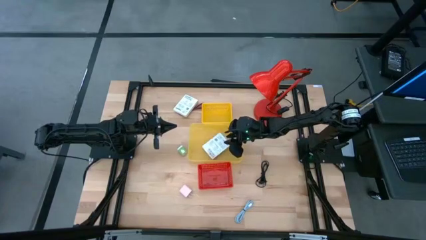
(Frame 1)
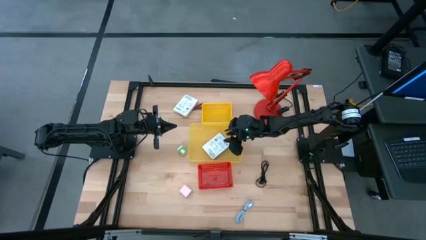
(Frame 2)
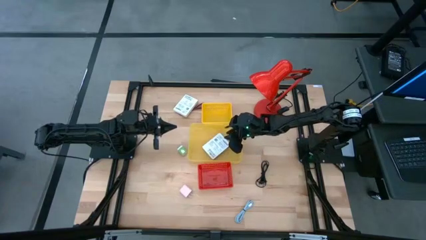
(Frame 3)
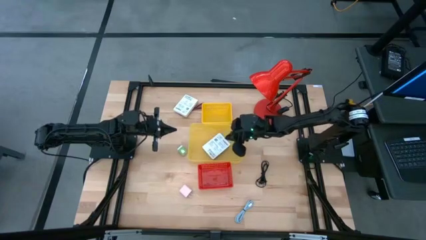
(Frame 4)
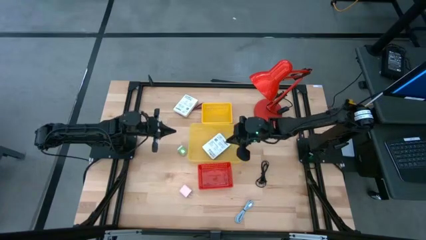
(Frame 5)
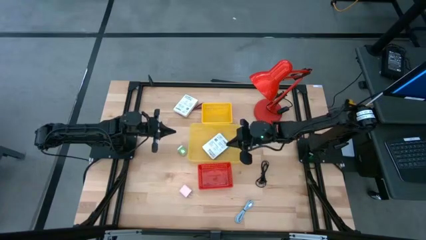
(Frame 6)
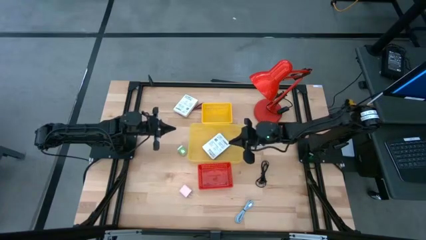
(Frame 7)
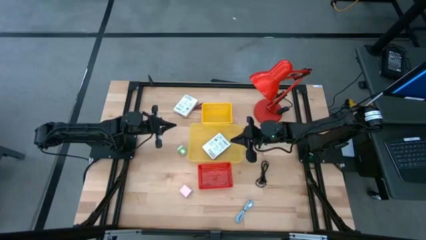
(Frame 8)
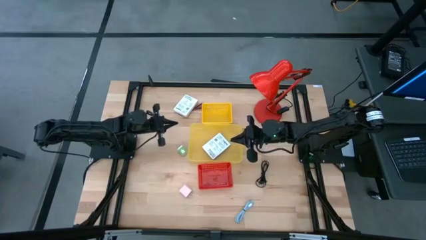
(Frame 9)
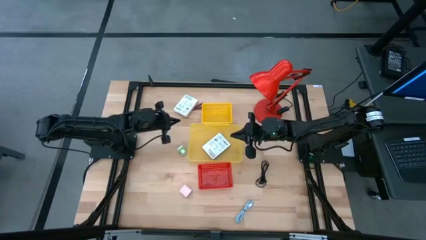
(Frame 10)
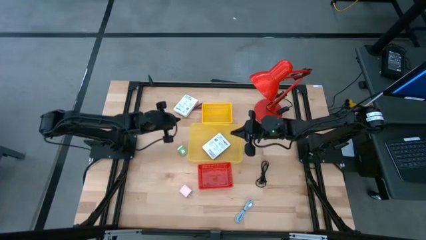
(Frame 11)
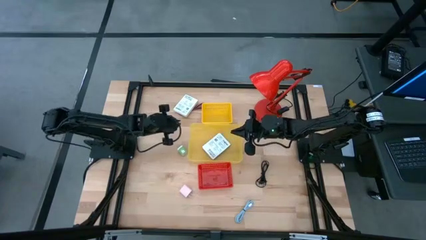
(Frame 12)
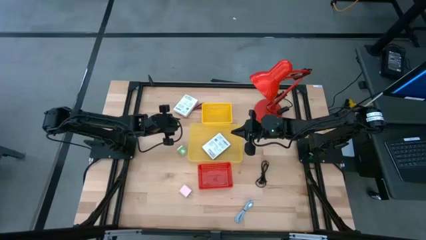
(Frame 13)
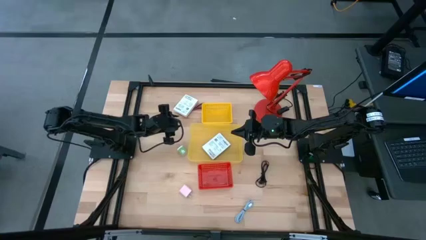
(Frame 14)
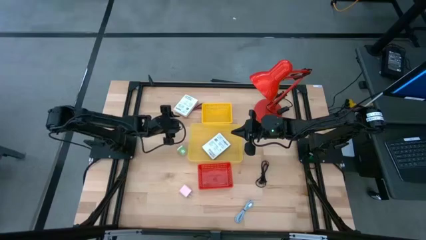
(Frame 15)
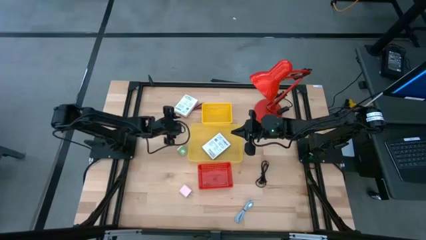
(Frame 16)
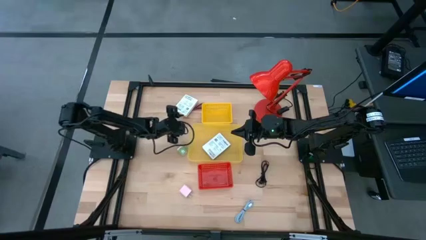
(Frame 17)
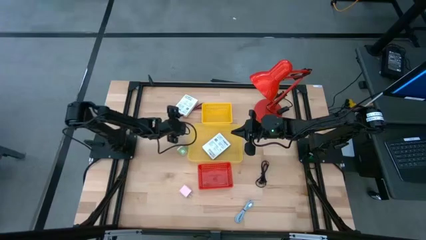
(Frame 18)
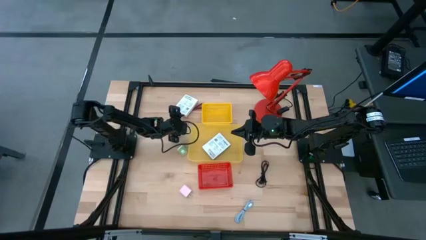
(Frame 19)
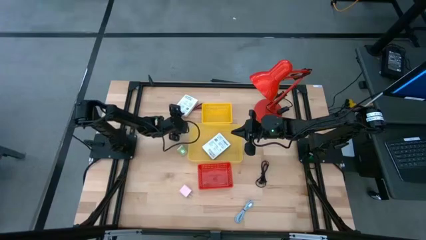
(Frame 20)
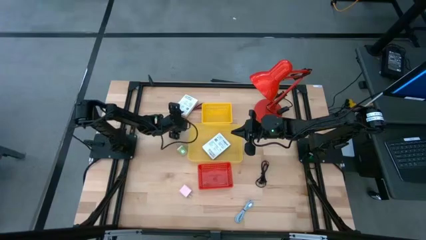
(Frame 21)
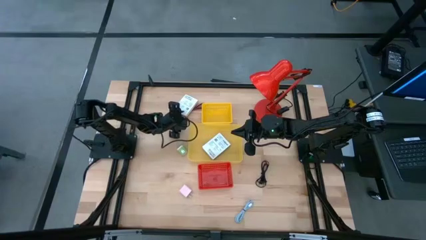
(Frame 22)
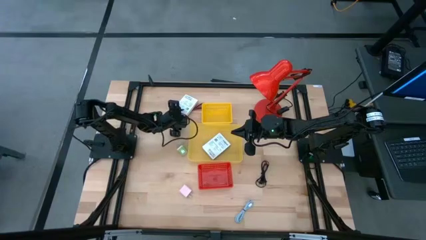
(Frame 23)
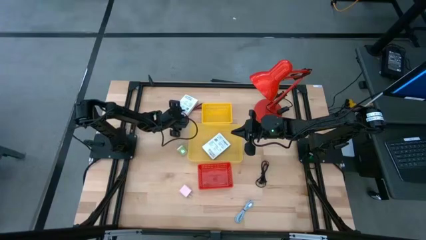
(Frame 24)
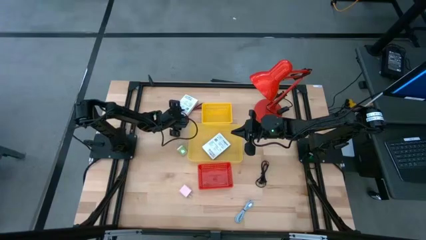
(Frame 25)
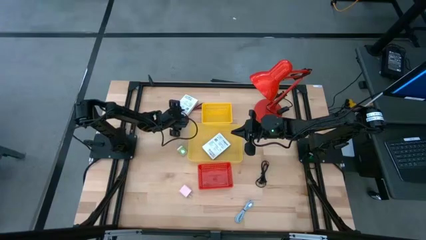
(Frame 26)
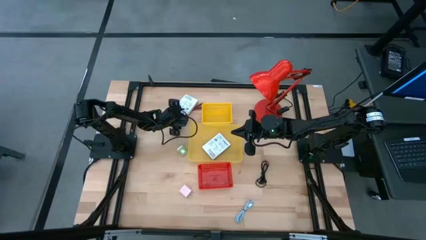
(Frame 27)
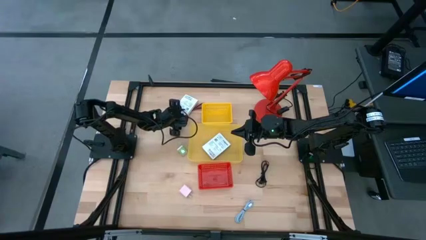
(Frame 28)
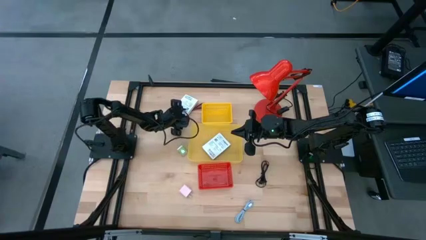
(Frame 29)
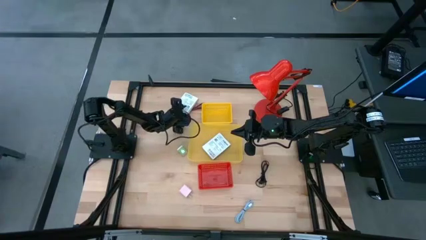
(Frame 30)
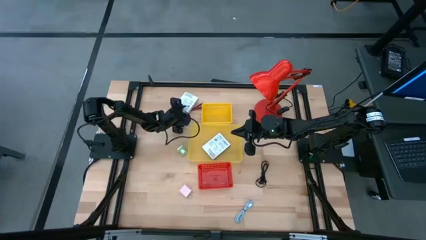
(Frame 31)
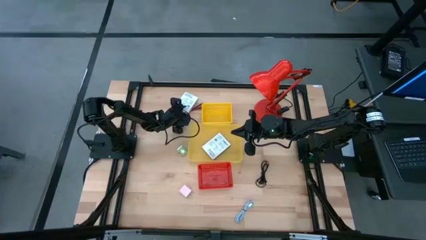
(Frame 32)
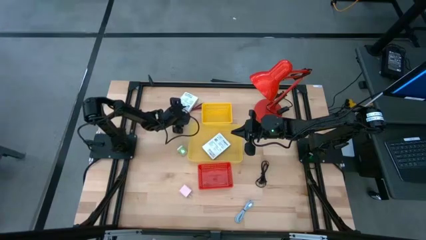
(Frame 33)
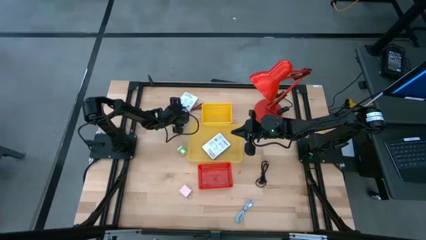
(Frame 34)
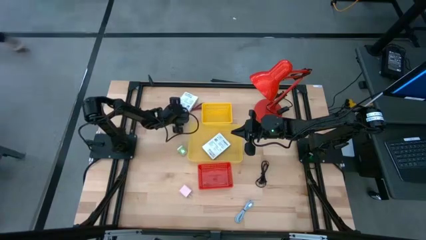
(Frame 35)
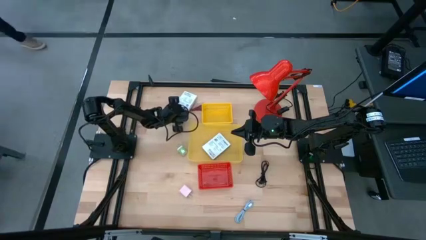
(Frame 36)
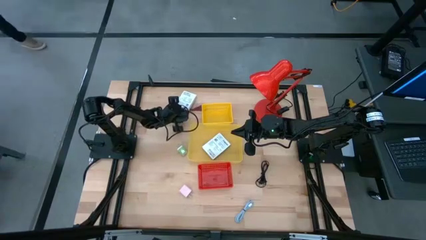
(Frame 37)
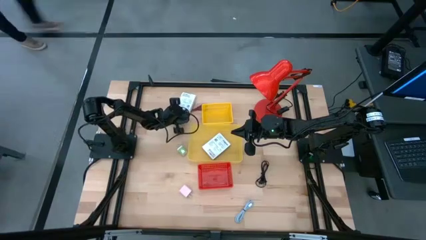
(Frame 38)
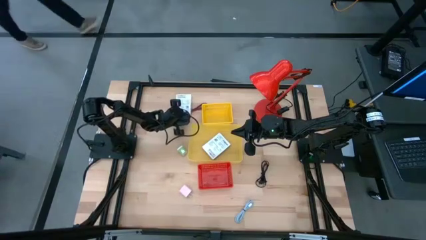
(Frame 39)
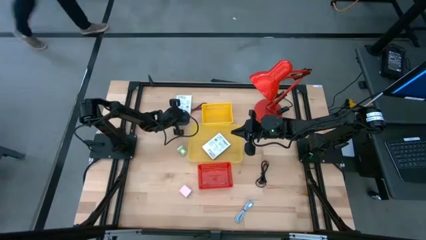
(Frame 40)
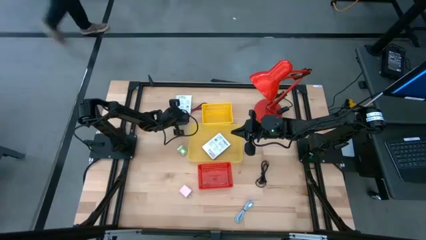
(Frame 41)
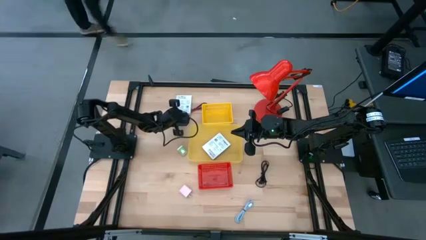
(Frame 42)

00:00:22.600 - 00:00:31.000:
Task: Pick and place items into bin
Put the white card reader box into the yellow transparent bin

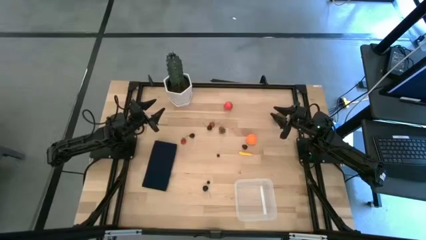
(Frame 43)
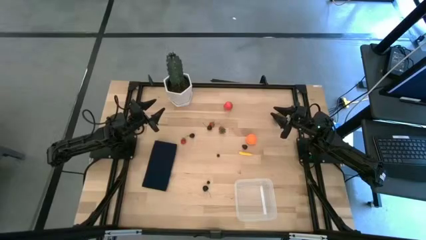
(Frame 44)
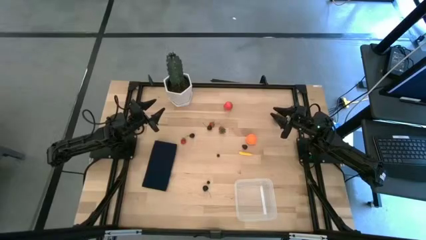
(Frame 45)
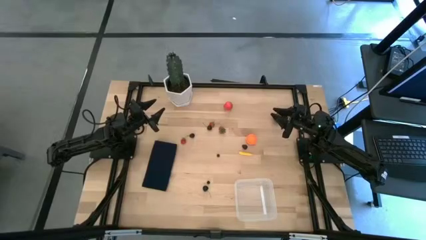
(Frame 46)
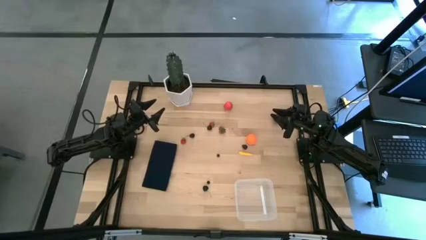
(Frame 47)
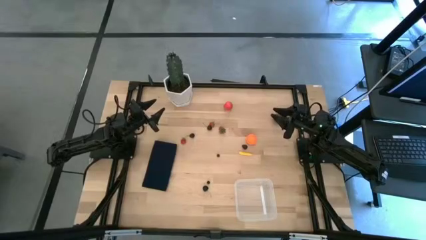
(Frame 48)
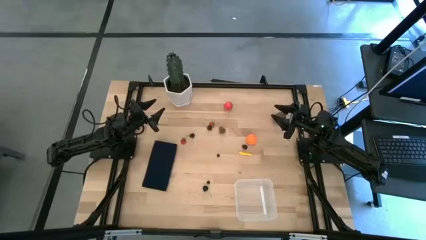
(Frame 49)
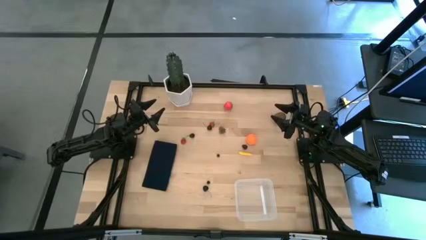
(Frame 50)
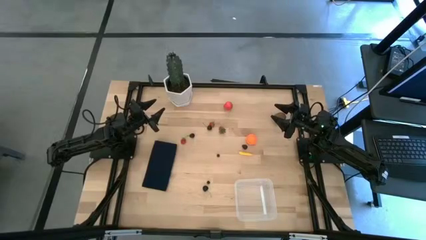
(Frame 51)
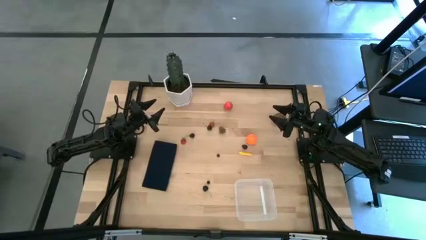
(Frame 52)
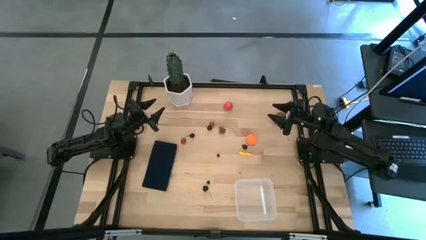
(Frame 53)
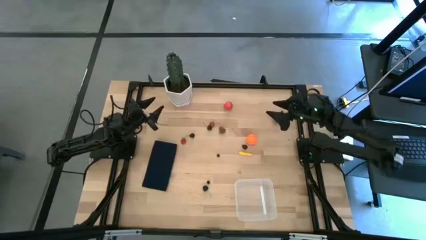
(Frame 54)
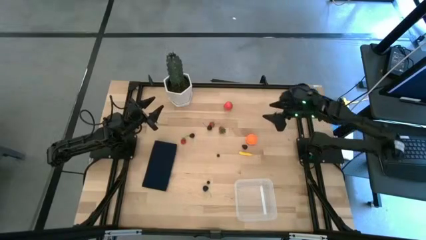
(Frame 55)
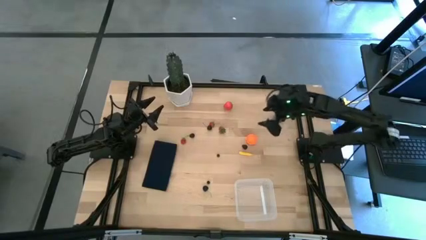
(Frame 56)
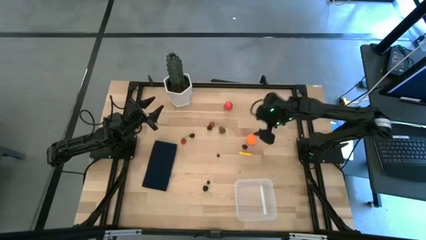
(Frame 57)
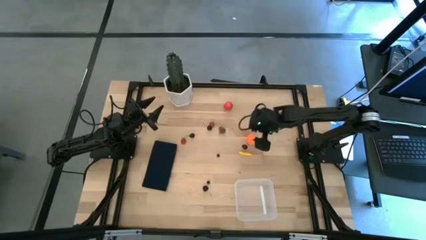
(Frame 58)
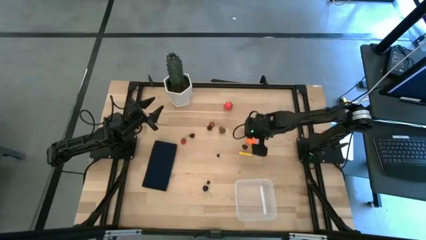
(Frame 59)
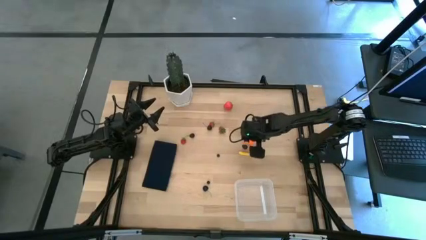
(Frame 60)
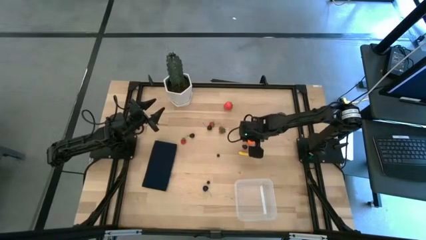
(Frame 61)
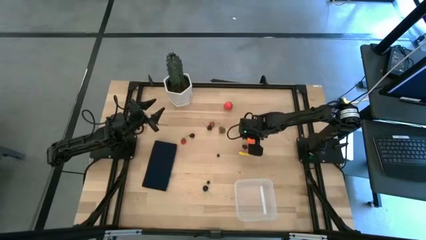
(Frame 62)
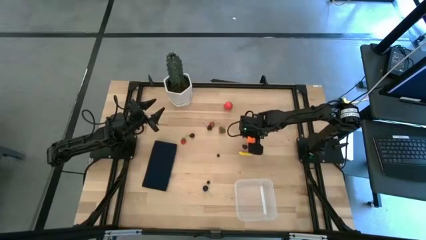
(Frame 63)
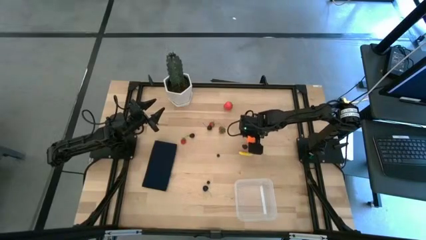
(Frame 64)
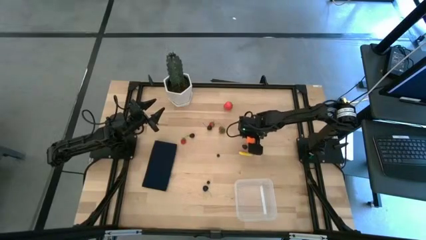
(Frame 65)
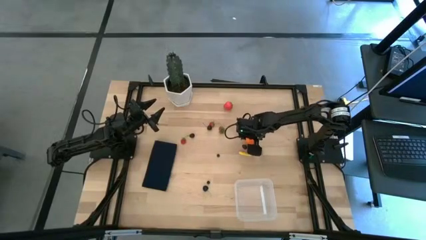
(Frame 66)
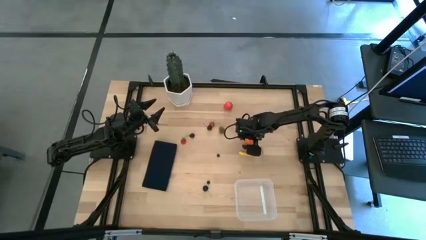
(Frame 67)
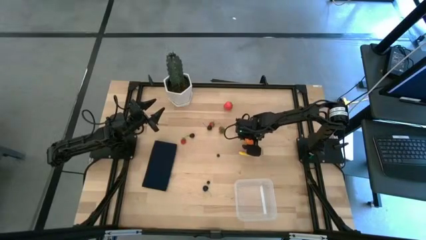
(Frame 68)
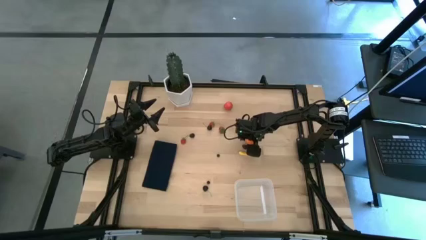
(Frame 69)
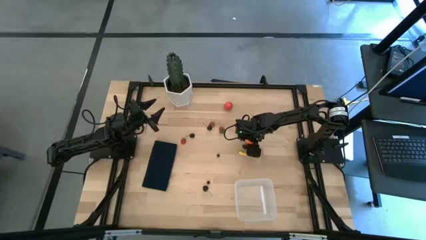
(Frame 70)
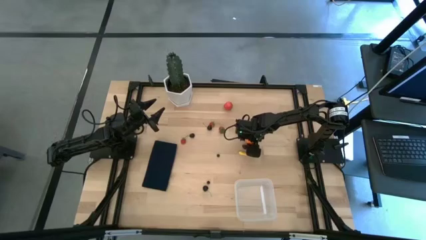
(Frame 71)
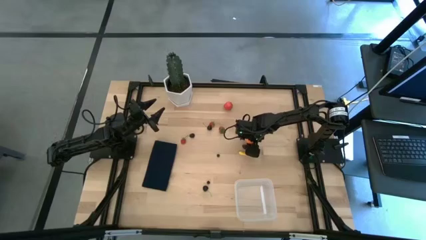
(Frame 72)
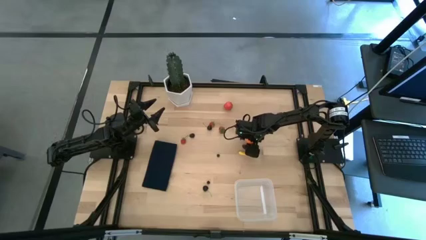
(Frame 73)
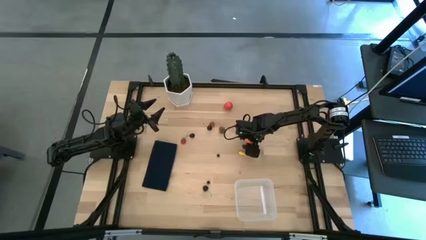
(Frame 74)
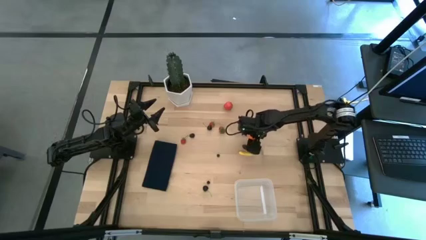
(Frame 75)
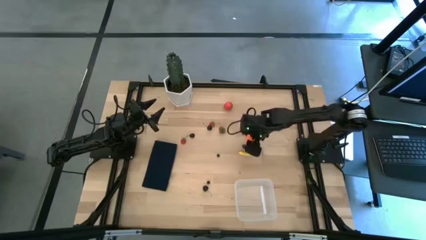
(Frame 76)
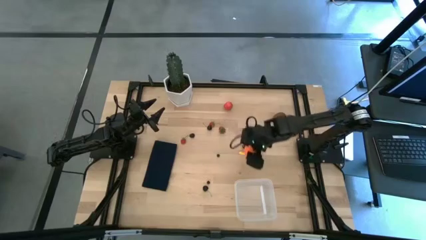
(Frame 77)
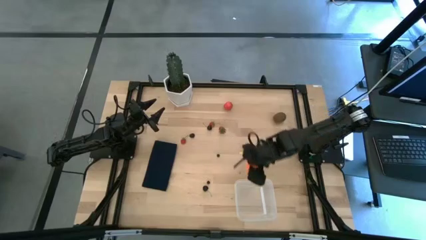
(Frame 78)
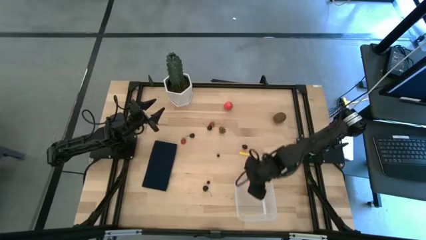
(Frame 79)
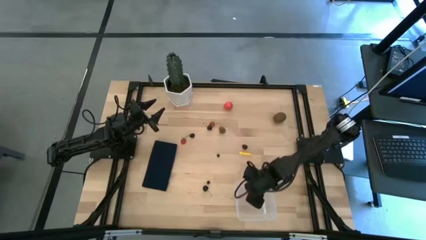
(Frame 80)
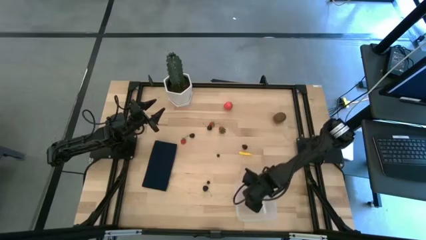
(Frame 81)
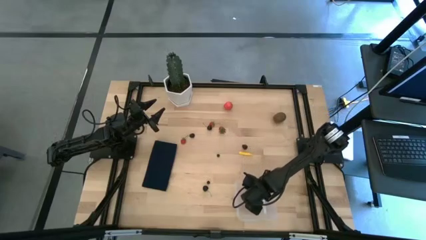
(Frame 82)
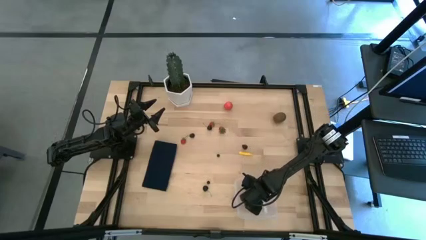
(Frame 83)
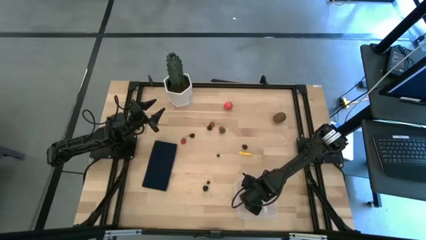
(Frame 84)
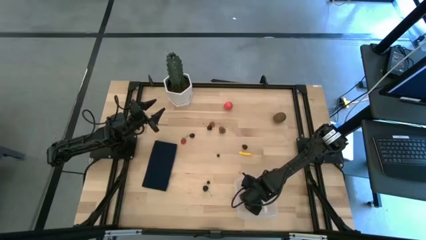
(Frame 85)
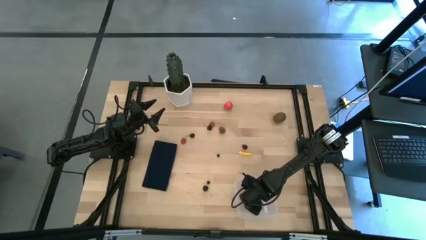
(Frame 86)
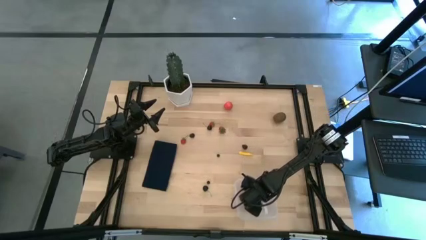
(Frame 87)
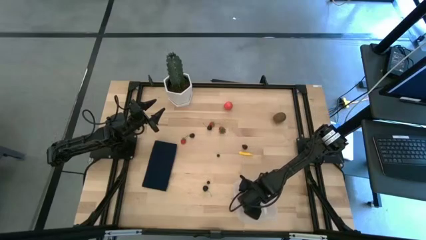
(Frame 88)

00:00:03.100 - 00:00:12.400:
Task: Pick and placing Produce into tupperware
Put the pumpkin into the transparent bin
